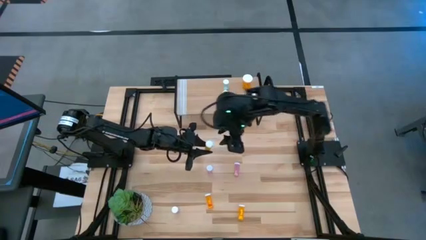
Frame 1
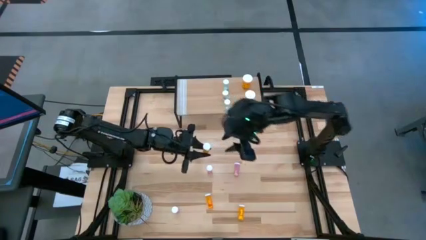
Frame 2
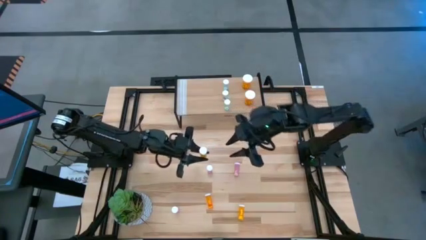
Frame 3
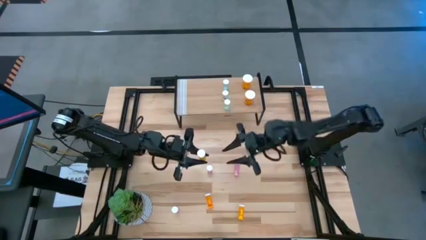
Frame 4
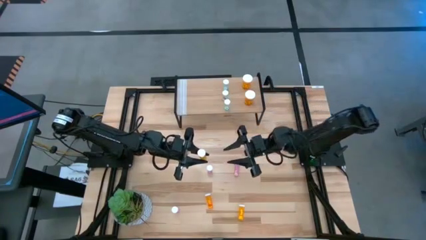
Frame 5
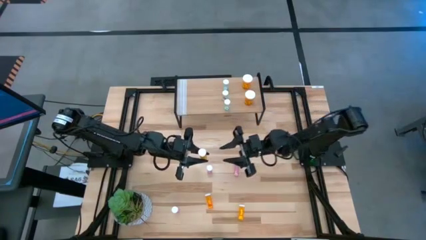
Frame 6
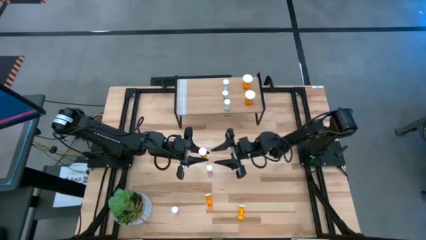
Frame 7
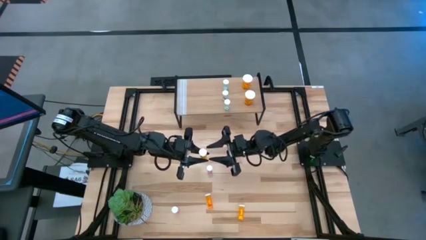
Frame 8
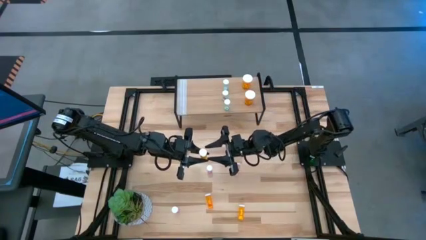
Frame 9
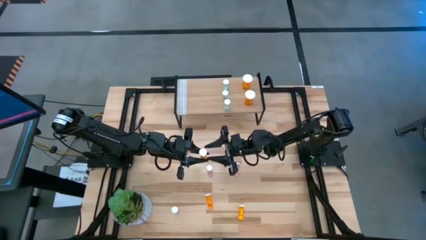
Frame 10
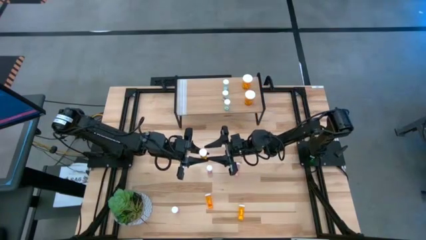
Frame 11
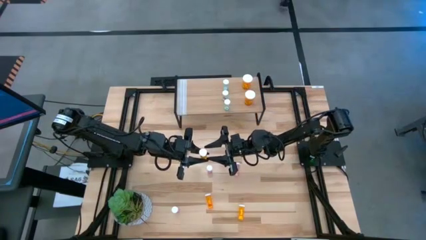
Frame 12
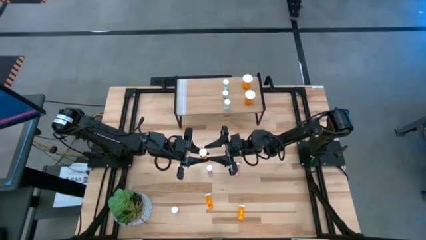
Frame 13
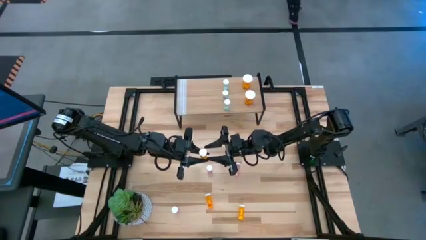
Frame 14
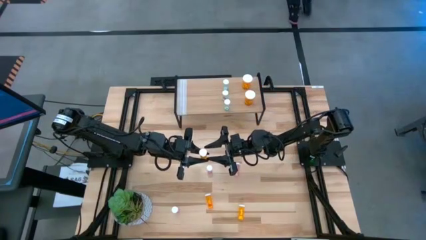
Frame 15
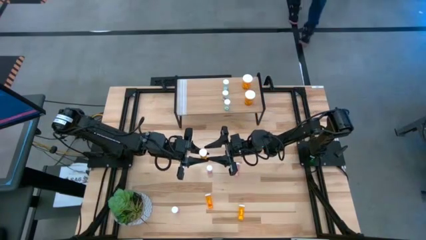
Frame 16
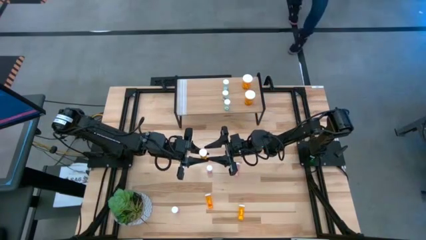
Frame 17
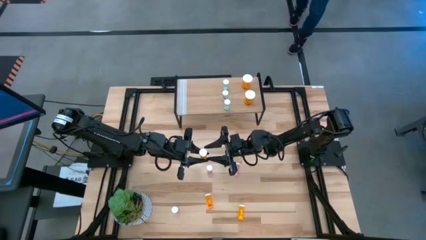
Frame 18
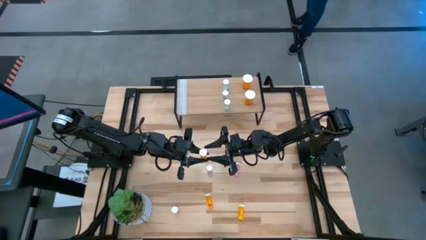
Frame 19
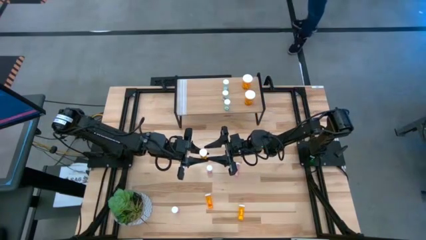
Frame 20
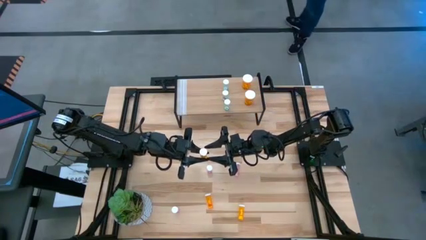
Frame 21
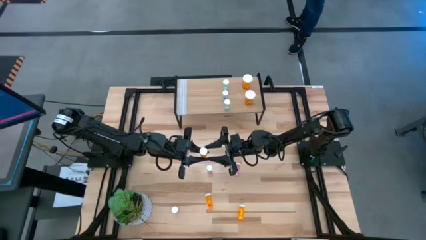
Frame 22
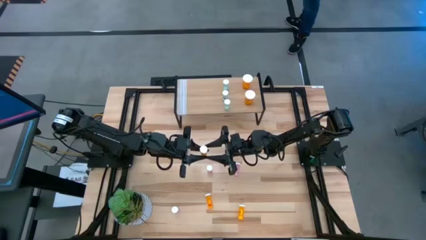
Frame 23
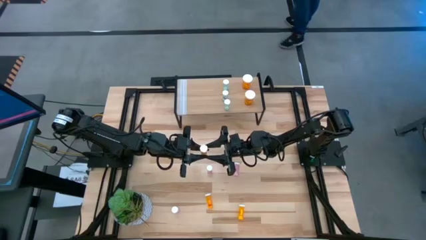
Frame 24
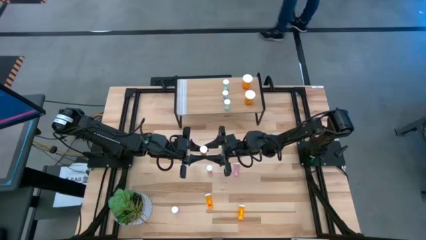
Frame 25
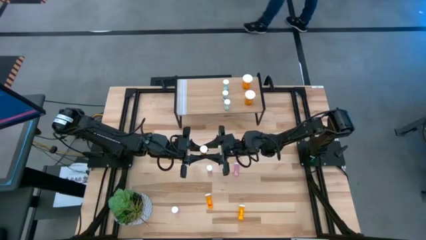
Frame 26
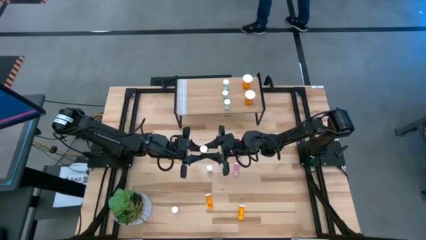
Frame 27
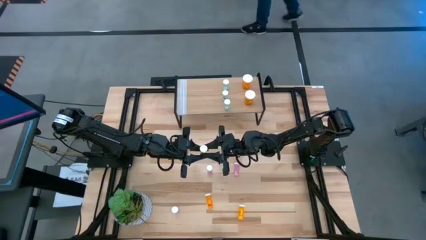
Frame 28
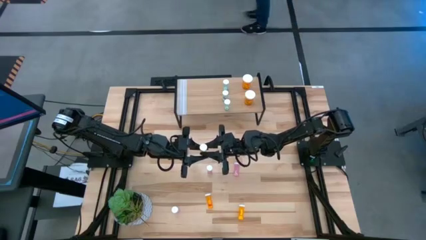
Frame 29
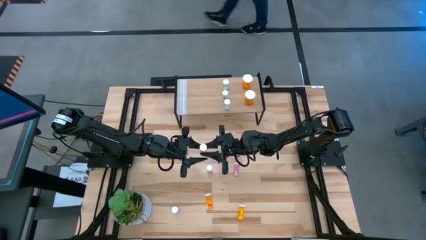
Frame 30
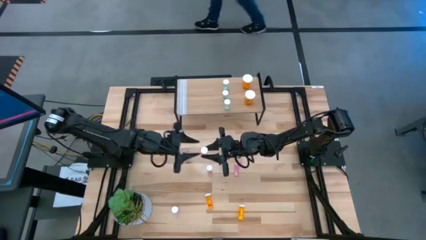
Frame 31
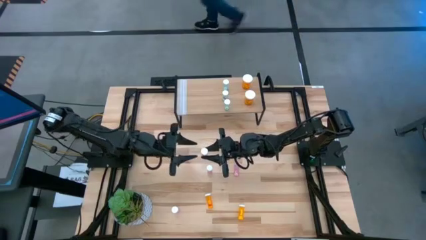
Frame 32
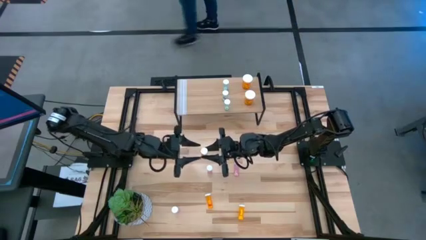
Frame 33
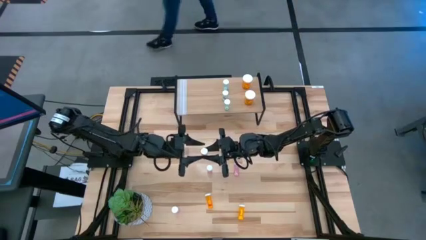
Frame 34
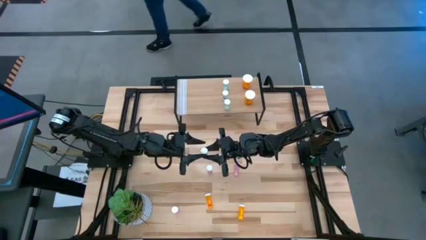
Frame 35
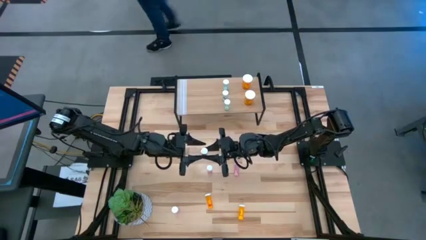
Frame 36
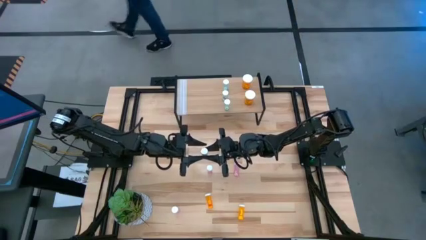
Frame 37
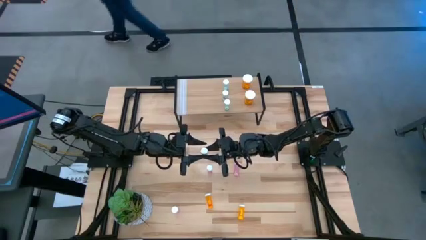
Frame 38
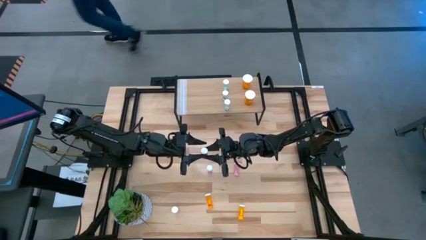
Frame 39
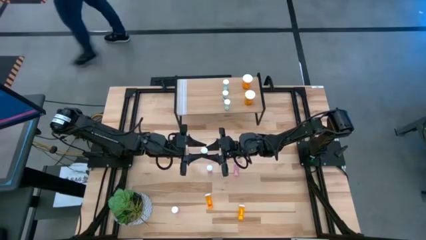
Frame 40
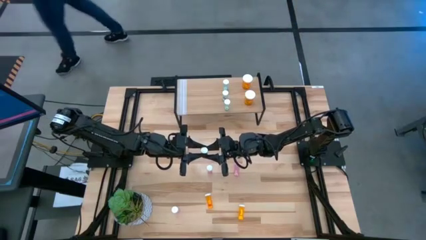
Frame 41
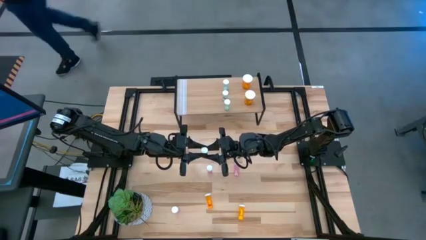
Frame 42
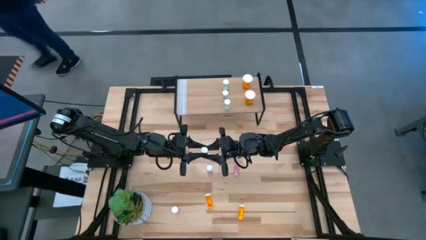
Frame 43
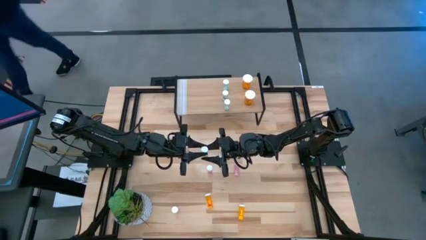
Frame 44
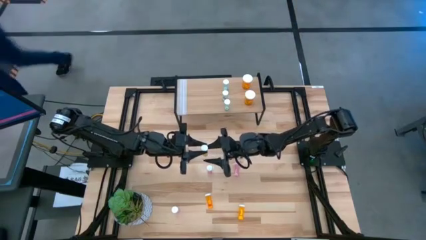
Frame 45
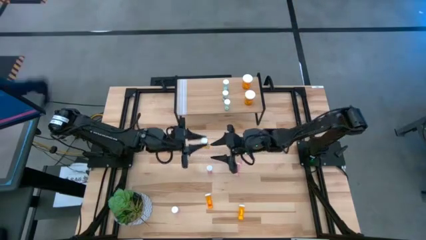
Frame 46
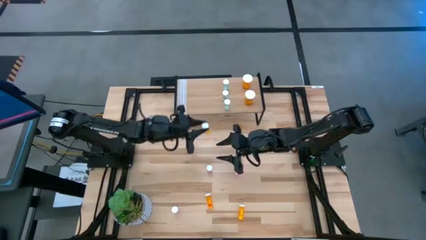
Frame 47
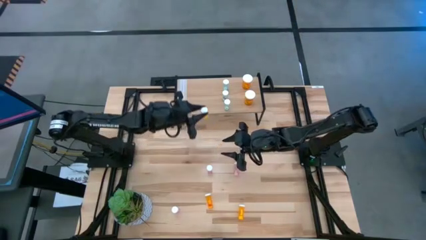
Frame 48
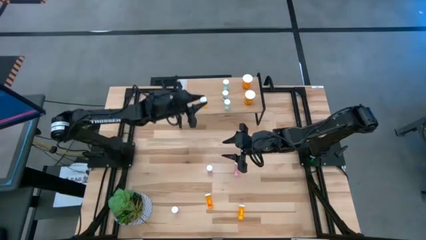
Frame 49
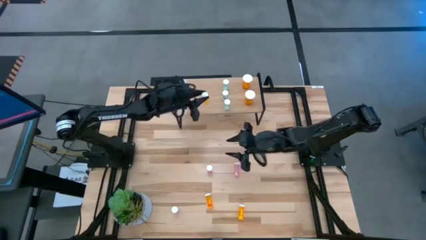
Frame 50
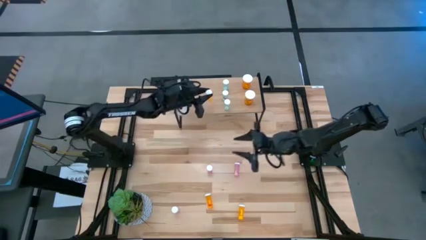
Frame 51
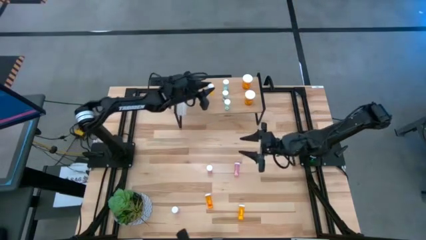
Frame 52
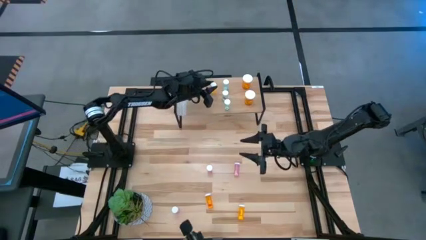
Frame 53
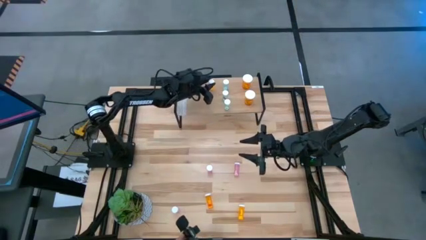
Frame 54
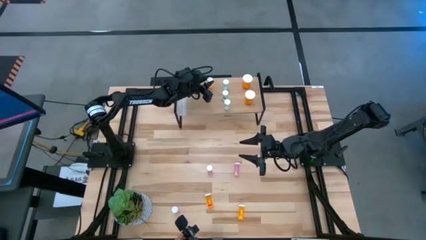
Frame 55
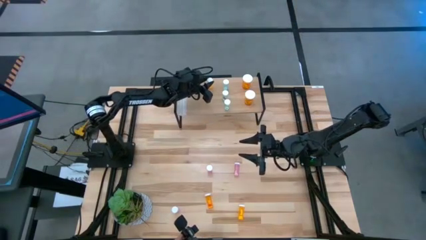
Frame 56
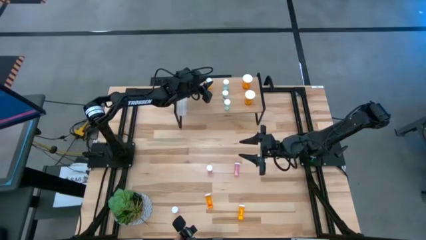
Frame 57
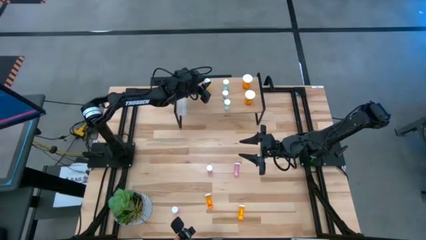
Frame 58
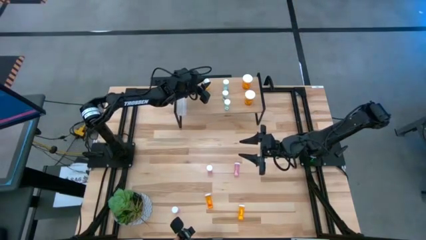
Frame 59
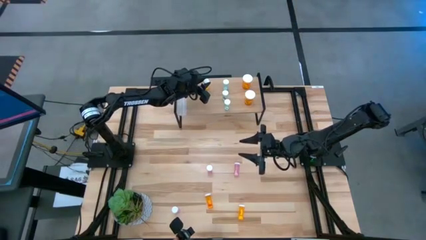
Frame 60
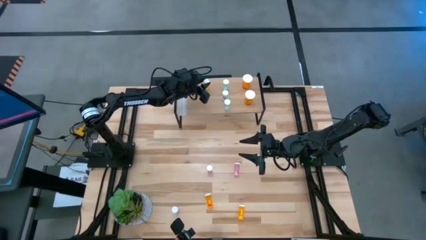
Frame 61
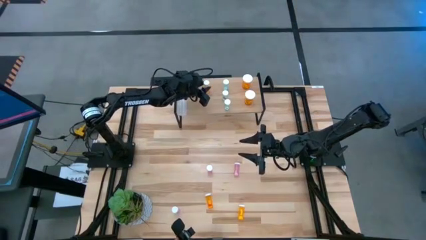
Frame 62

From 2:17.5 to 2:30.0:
Task: Pick and place medicine bottles onto shelf by color
Put the bottom right small orange pill bottle on the shelf

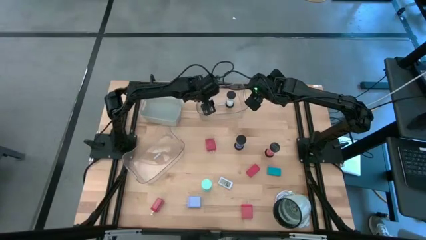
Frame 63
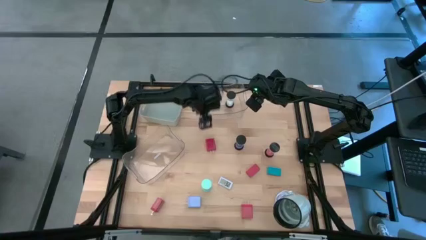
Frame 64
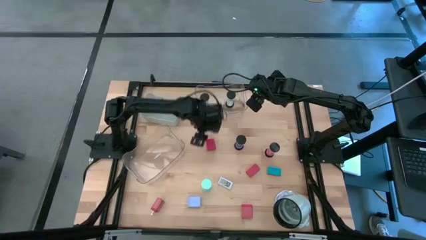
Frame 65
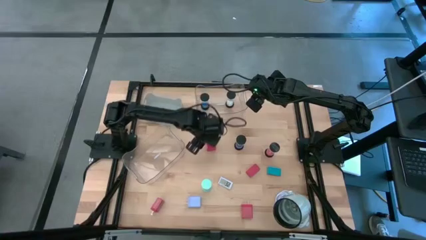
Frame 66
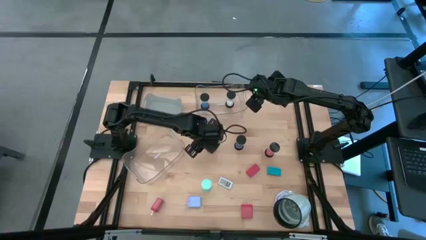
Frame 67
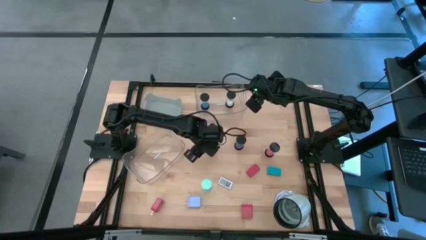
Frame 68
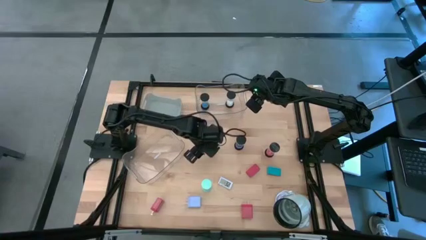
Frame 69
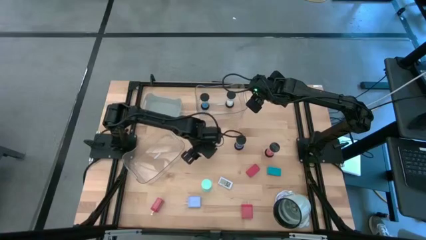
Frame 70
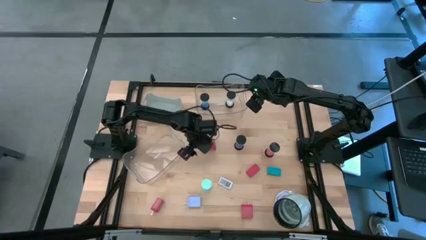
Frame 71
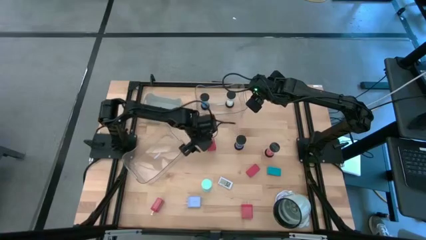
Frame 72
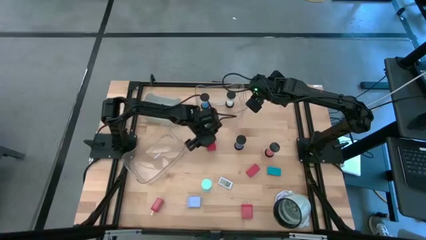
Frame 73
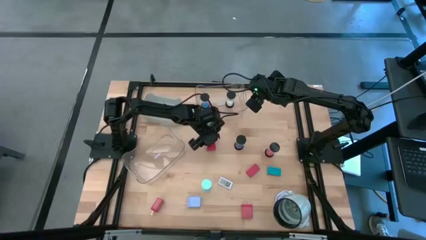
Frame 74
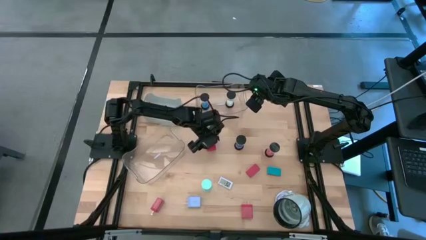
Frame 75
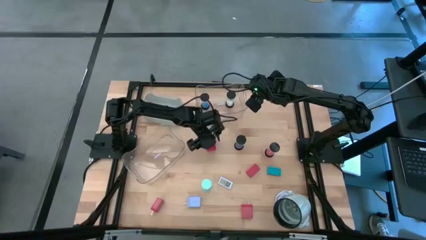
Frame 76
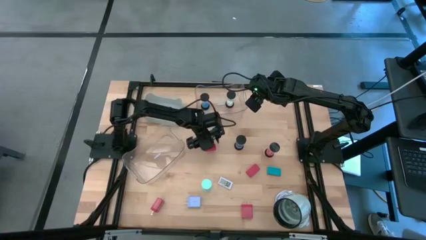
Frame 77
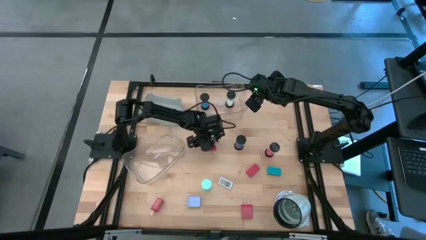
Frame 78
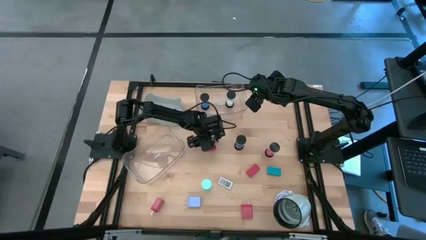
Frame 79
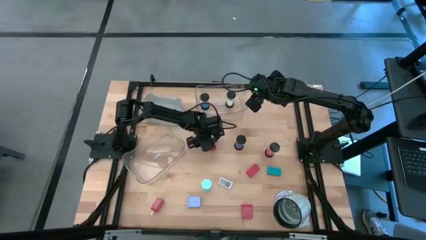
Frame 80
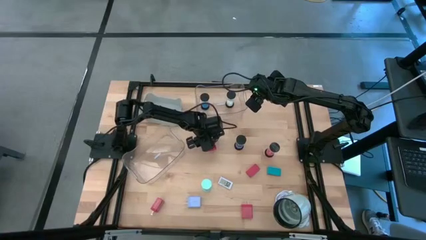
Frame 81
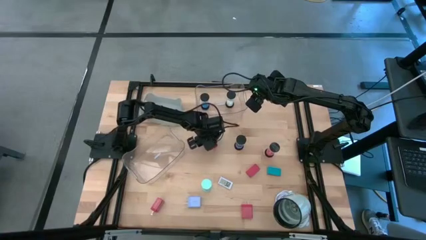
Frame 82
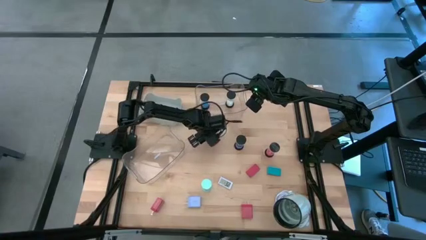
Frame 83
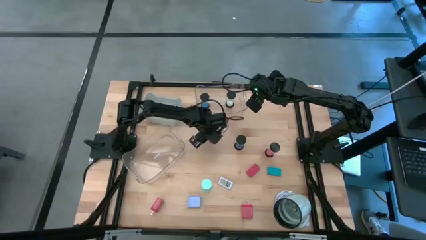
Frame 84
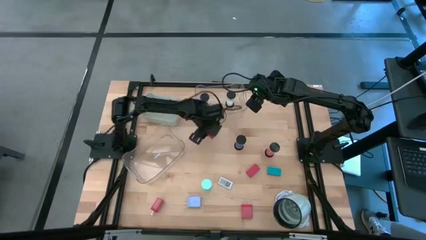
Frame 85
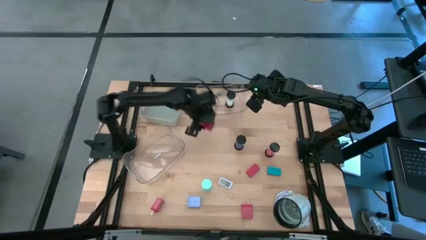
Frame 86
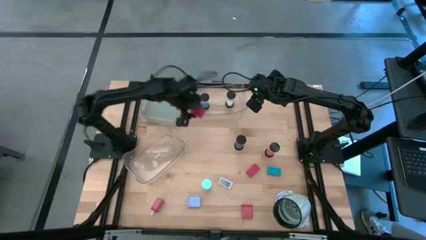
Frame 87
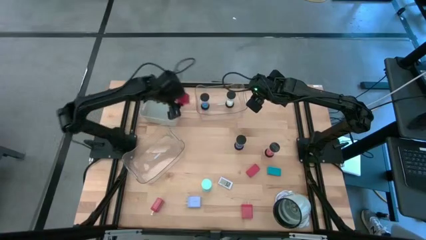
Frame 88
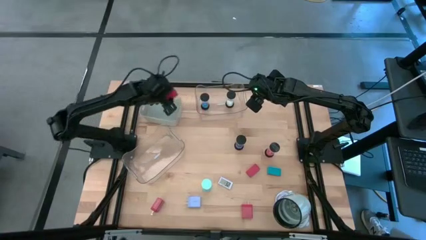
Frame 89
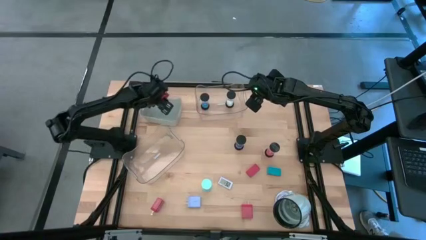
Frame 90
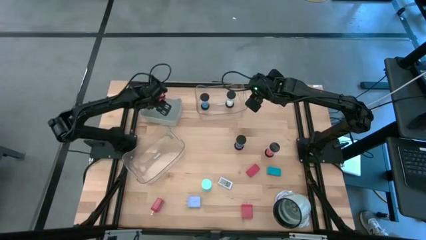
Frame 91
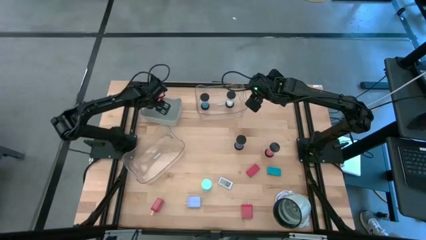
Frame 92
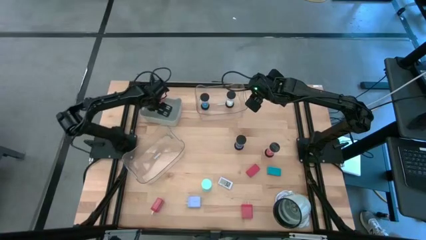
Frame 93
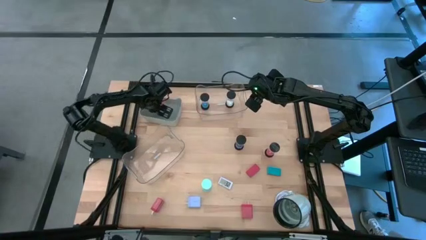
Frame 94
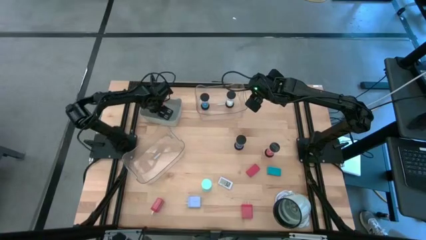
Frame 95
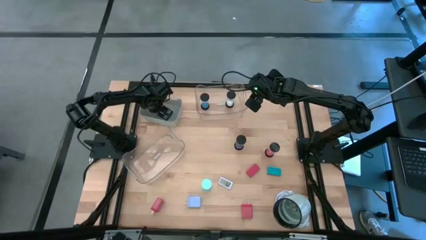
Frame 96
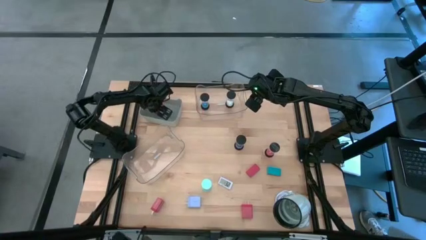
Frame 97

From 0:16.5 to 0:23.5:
Task: Pick & Place Office items
Put the top red charger adapter into the gray bin
